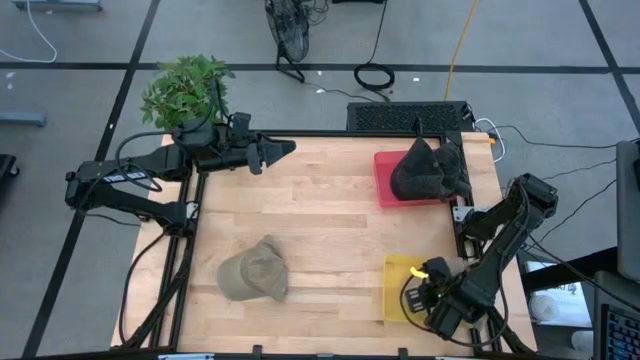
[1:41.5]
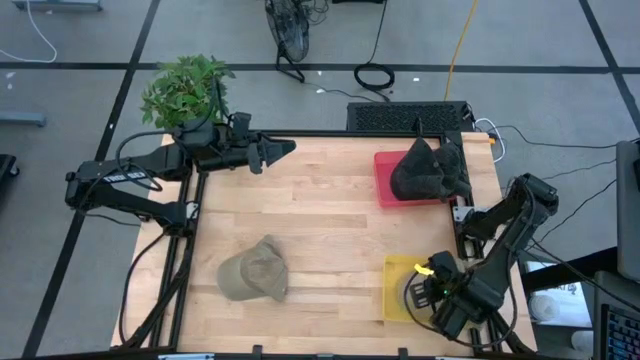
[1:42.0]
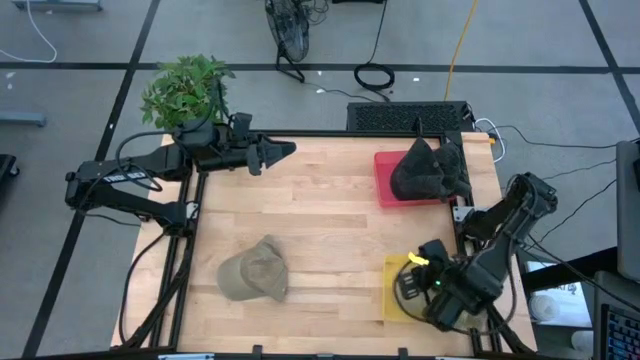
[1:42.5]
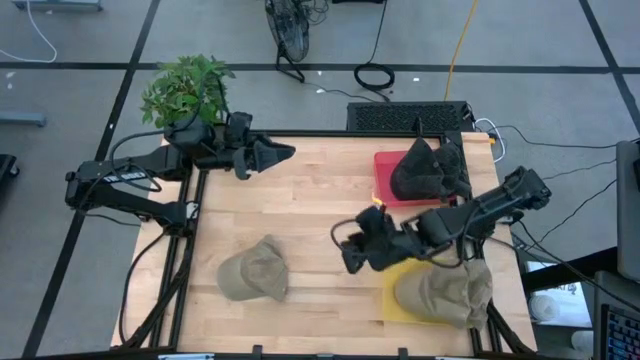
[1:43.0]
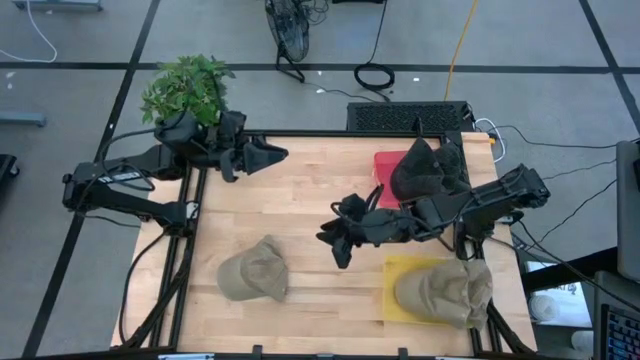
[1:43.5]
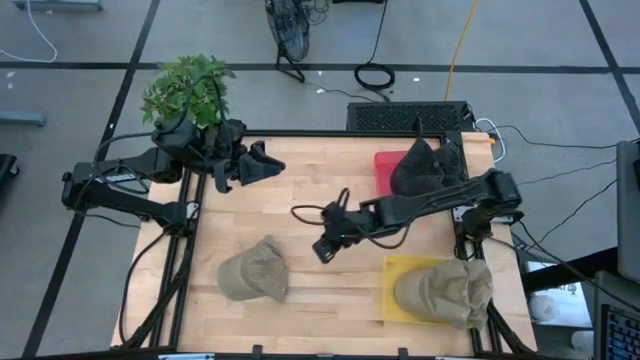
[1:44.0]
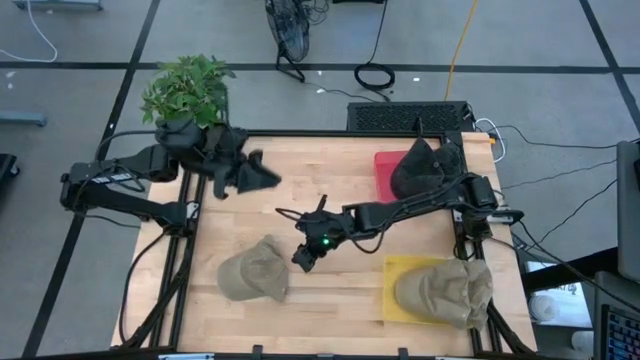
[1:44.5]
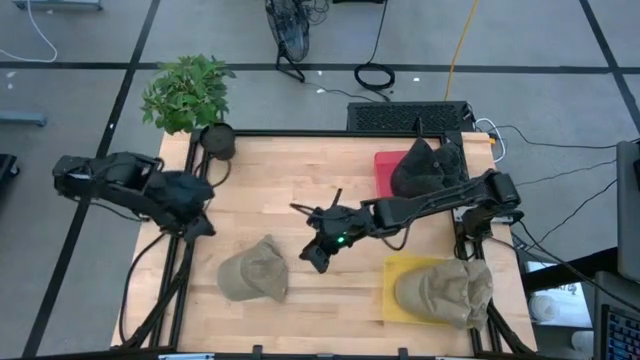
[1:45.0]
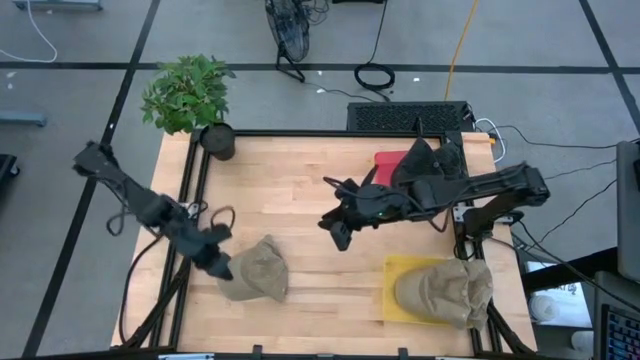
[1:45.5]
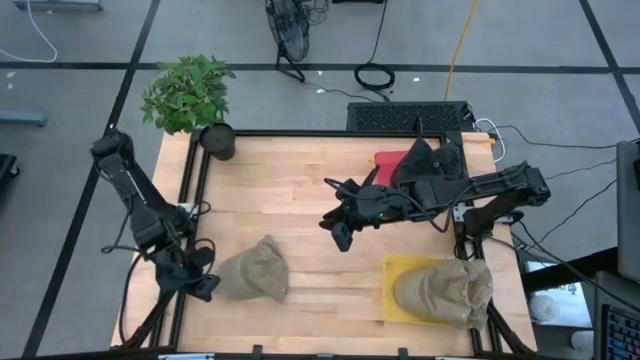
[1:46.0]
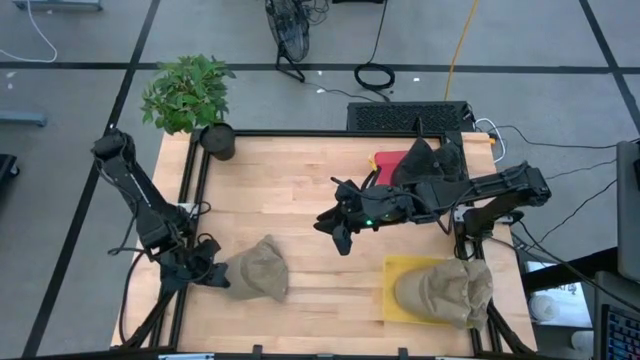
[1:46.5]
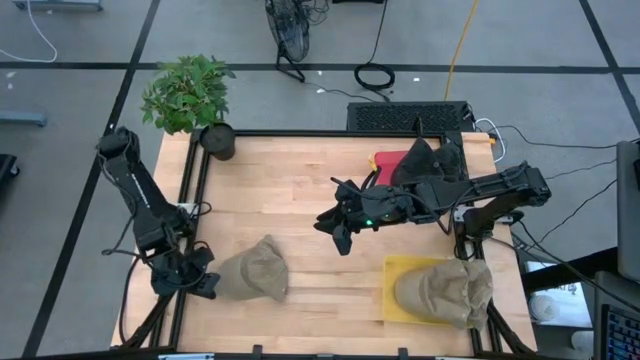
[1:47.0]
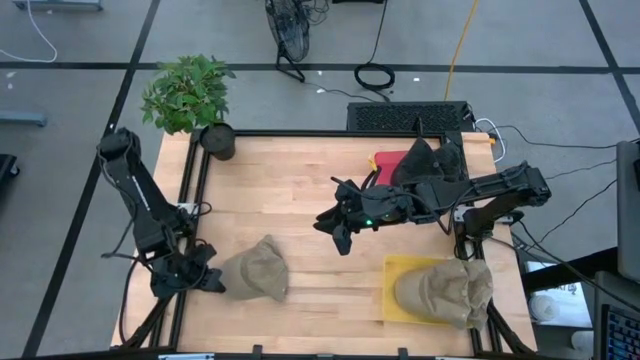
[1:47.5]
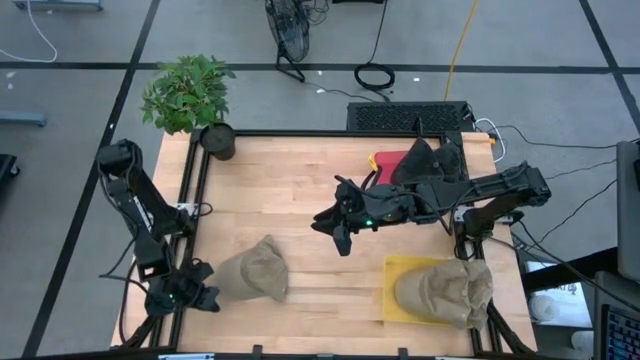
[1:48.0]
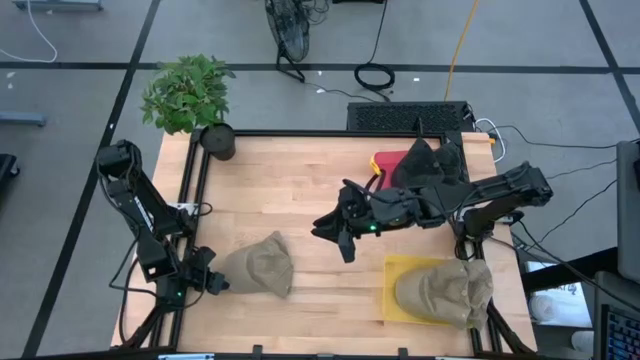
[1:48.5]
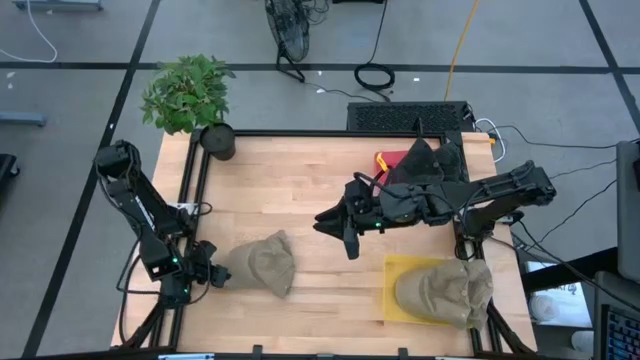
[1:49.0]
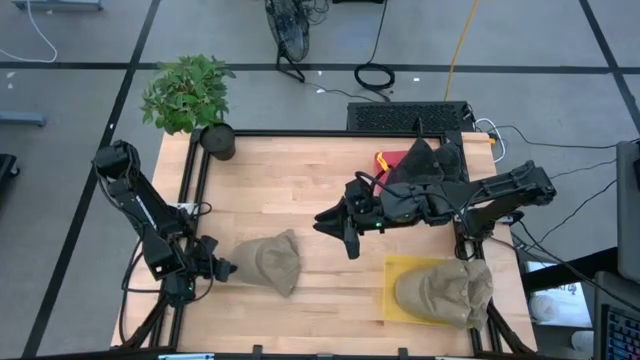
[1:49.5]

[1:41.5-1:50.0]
Task: Pick & Place hat
Put the brown cap into the yellow bin

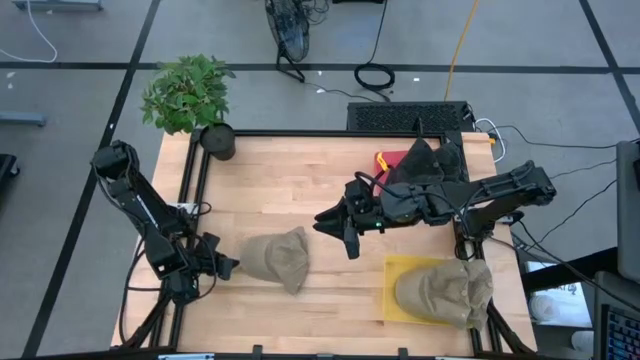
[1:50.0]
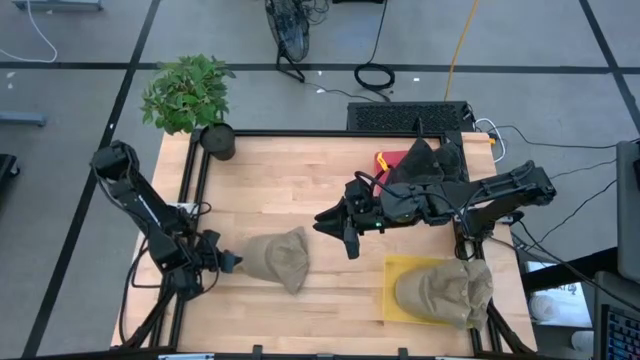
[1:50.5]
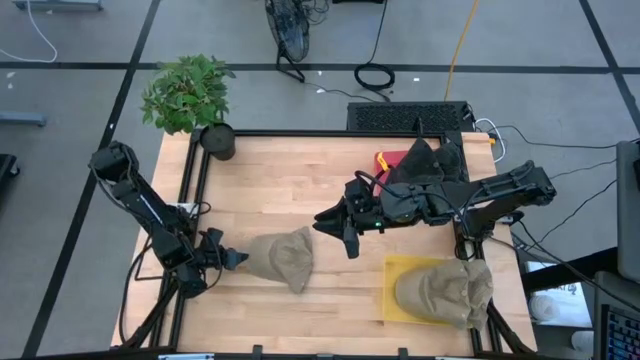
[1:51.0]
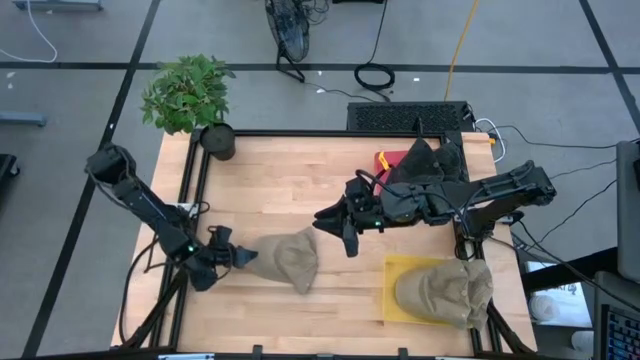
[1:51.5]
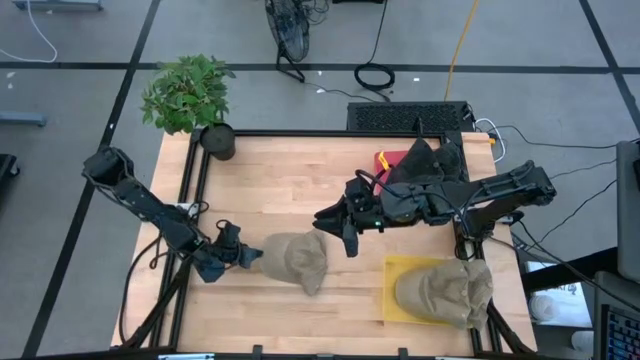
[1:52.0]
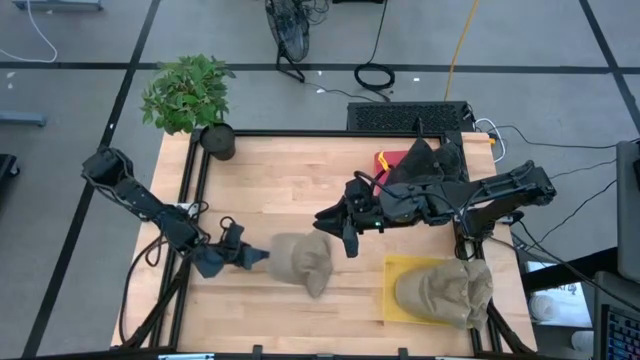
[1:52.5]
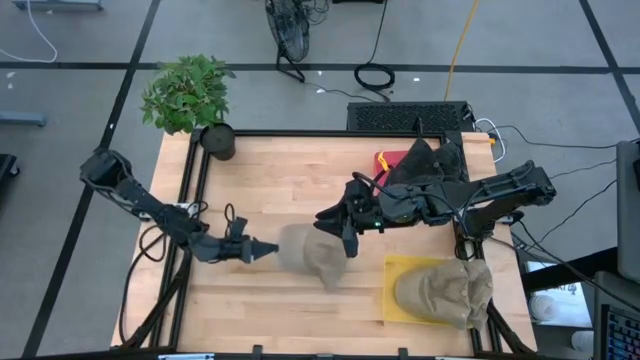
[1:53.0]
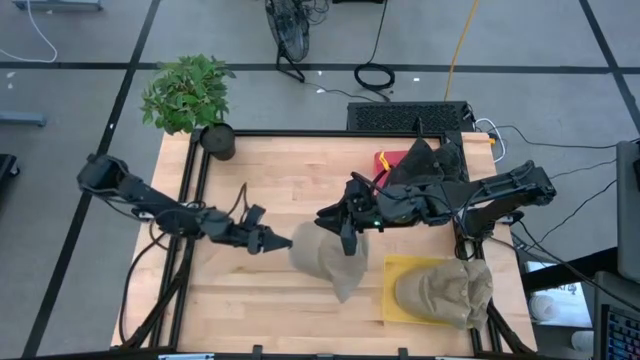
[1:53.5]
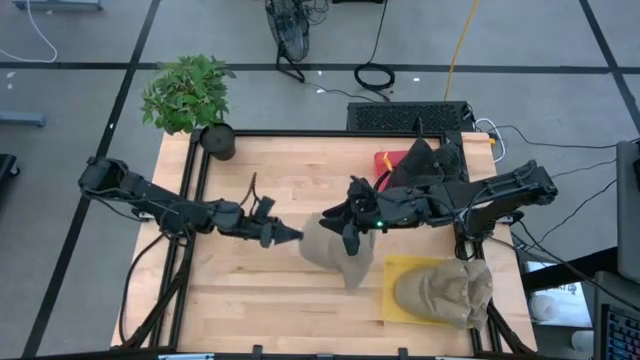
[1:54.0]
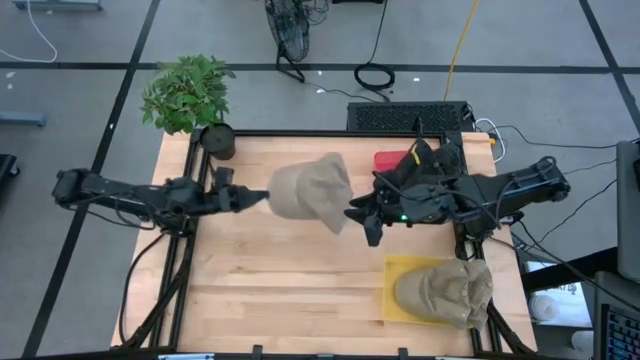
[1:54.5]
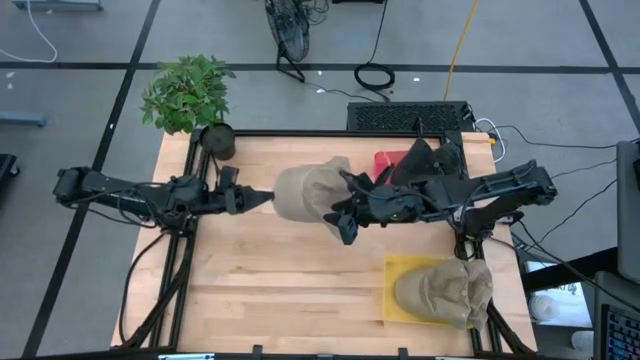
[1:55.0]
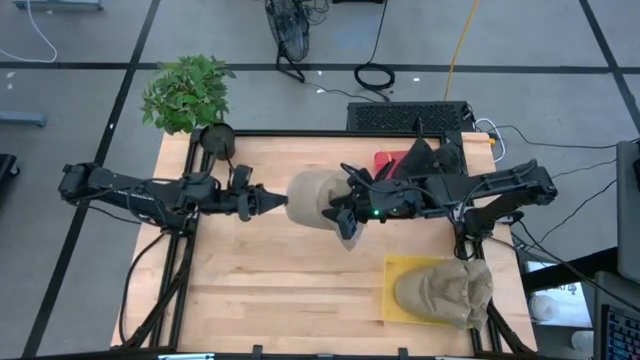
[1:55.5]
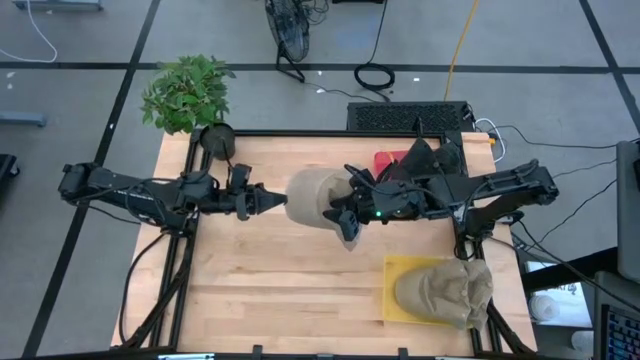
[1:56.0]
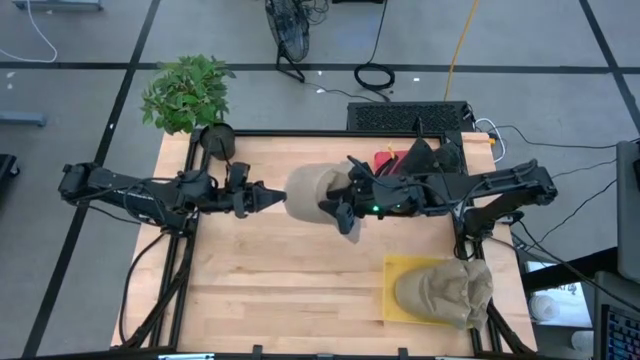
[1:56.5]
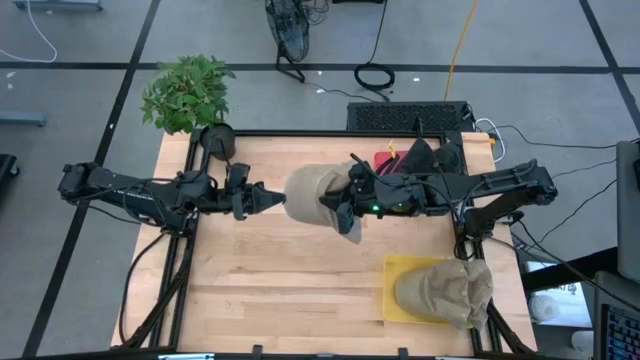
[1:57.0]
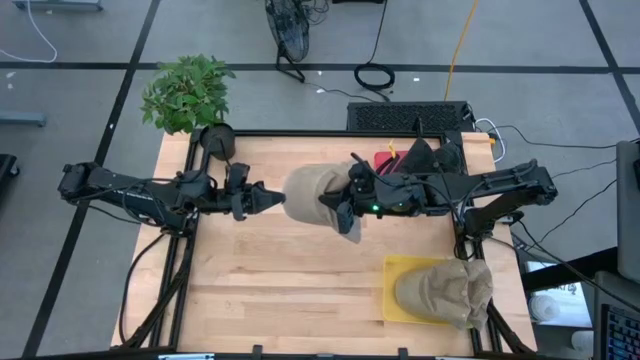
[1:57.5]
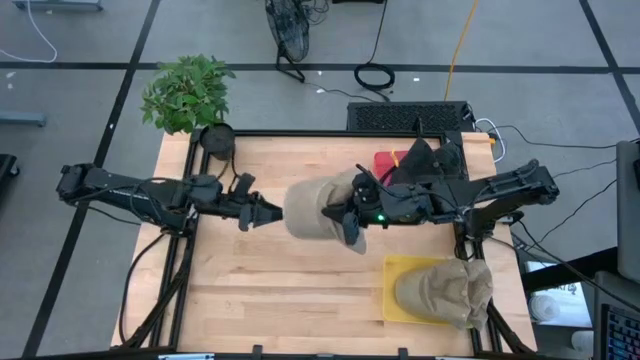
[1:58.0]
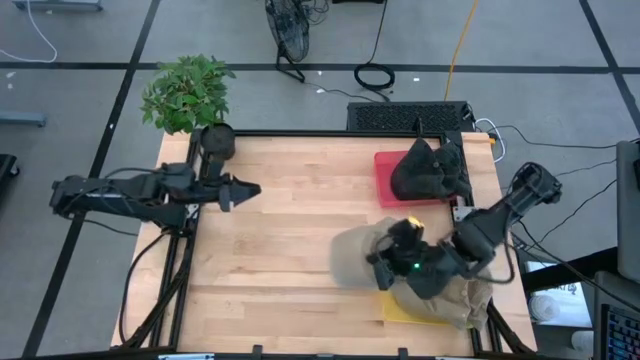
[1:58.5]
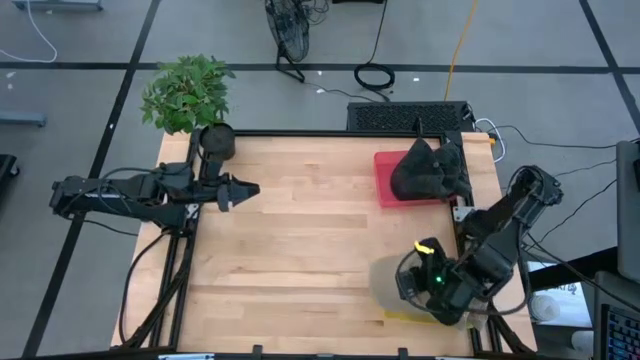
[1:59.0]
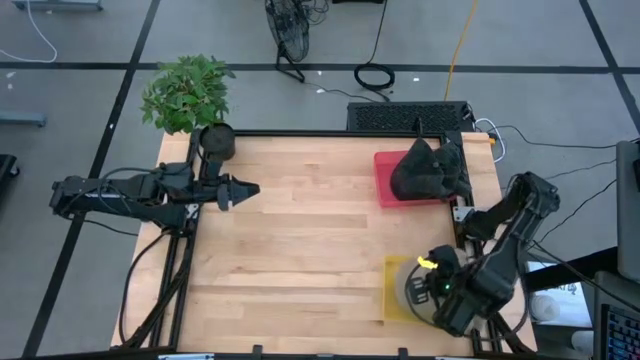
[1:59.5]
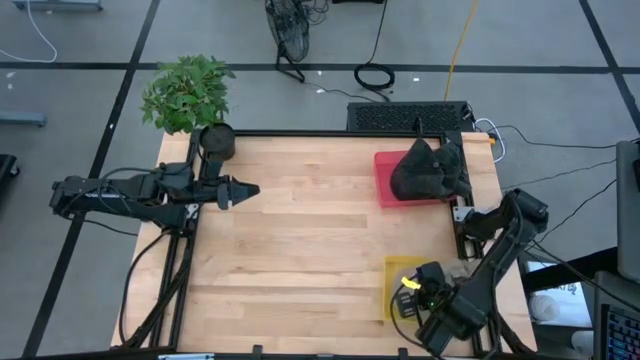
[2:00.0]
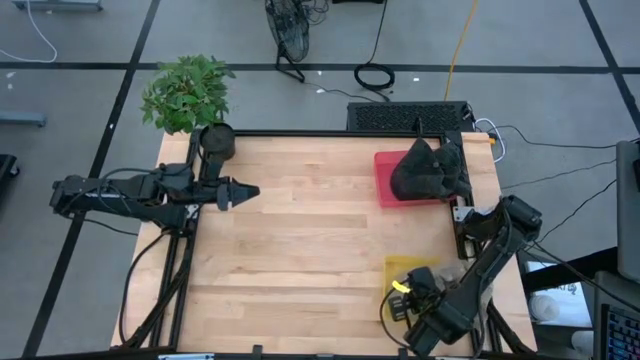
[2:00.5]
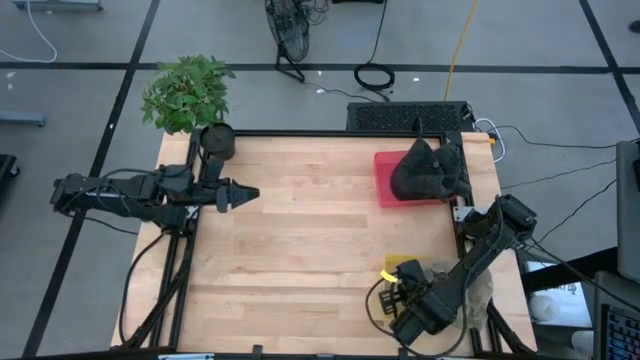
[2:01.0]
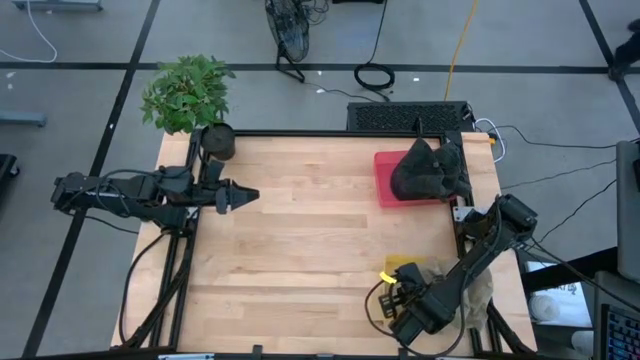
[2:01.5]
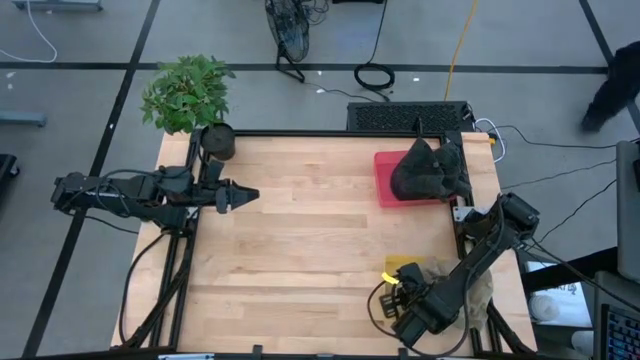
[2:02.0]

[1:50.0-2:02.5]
Put the brown cap into the yellow bin

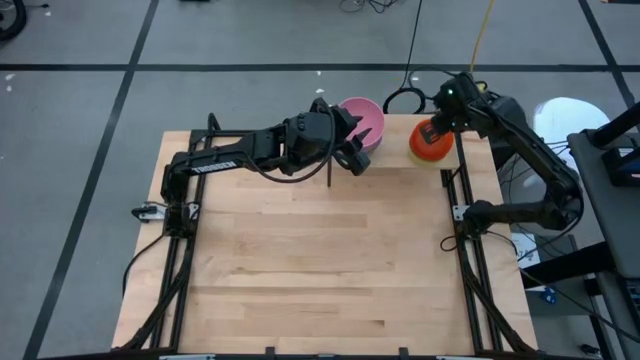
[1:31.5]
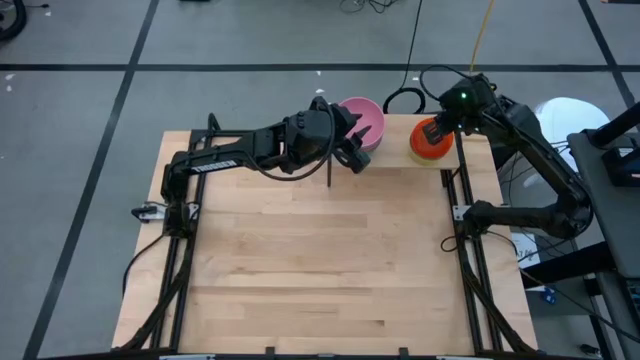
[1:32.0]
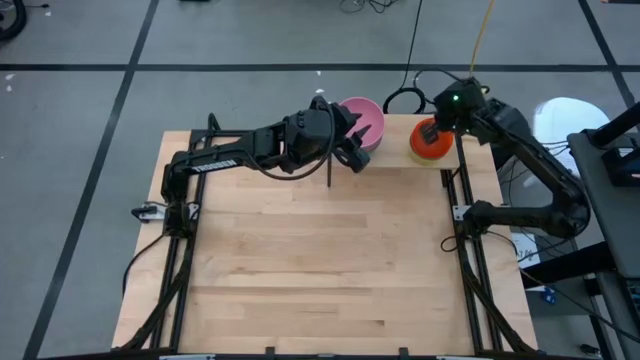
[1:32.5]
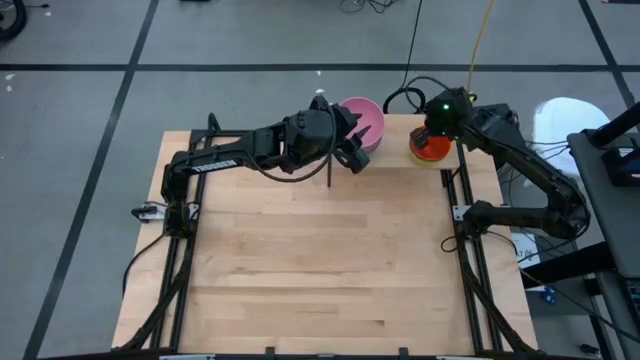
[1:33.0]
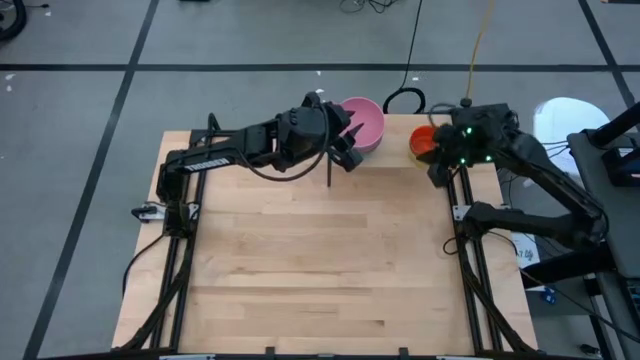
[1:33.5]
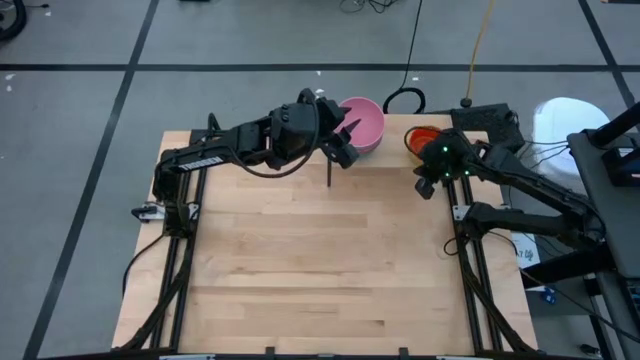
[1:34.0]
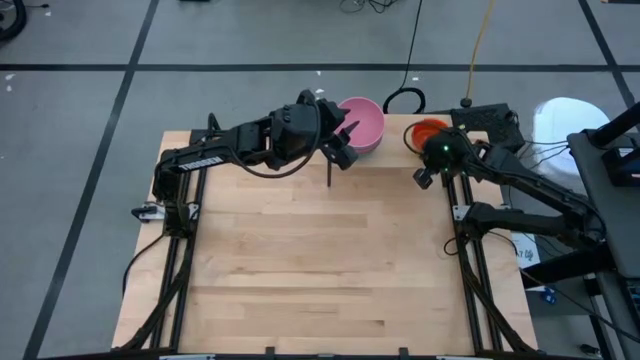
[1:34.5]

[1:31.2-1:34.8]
Task: Place and stack bowls onto a shelf
Adjust the orange bowl on top of the purple bowl on the shelf
